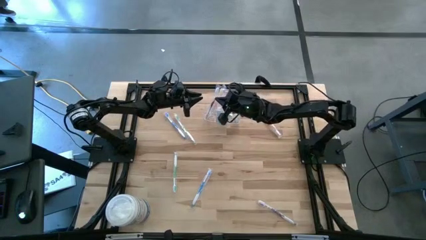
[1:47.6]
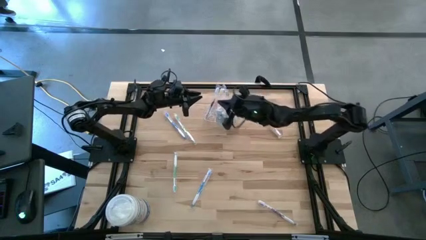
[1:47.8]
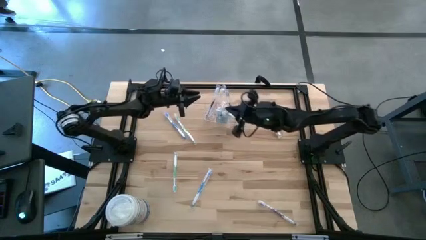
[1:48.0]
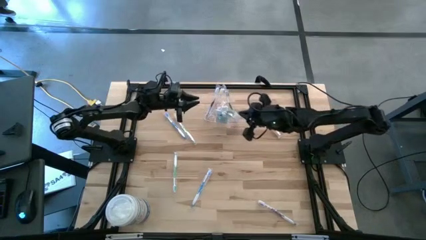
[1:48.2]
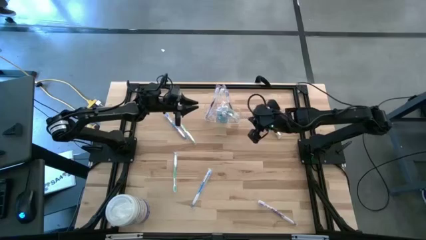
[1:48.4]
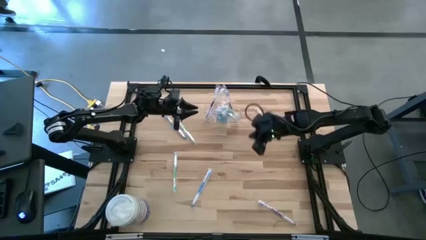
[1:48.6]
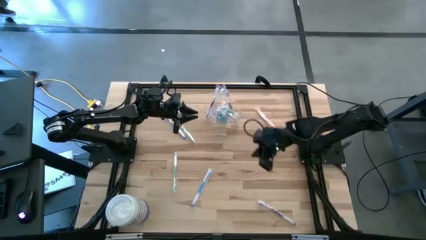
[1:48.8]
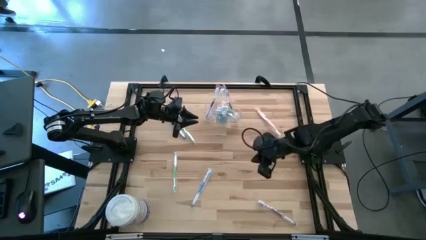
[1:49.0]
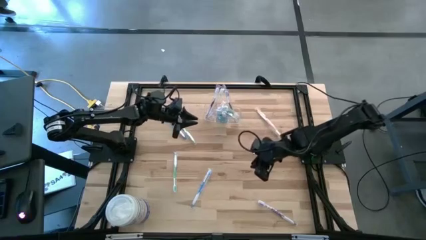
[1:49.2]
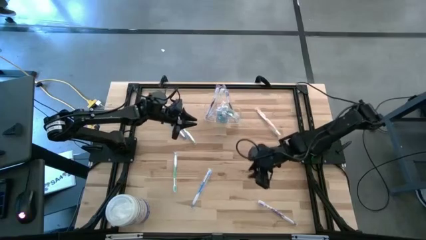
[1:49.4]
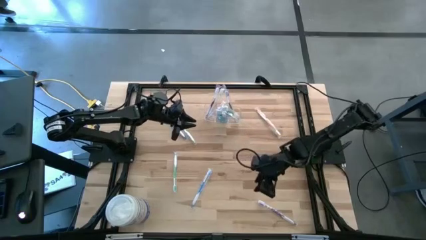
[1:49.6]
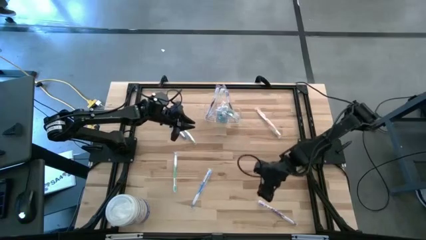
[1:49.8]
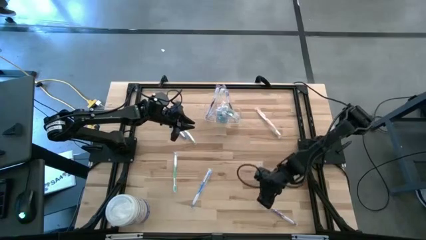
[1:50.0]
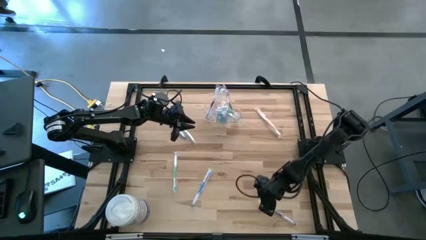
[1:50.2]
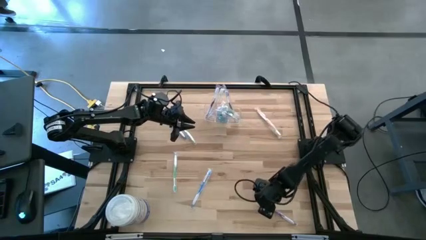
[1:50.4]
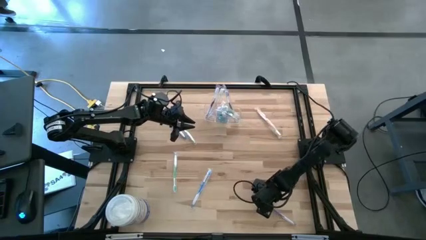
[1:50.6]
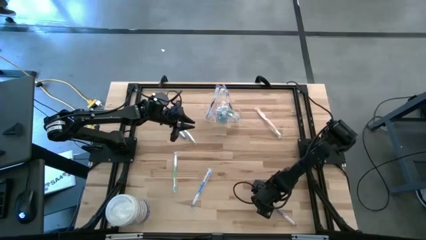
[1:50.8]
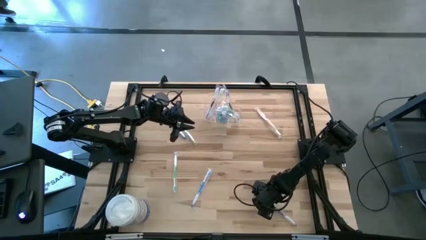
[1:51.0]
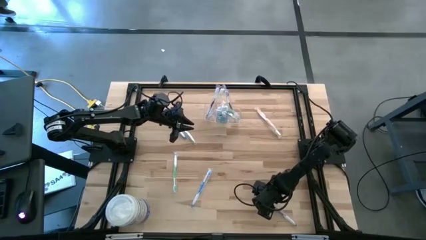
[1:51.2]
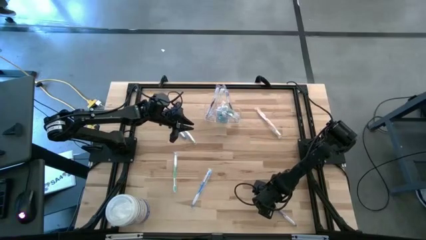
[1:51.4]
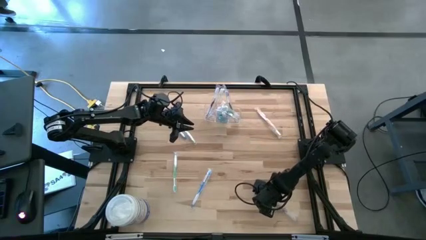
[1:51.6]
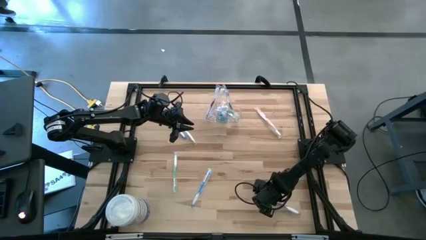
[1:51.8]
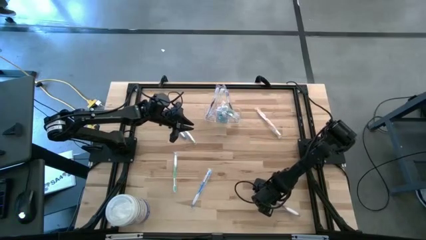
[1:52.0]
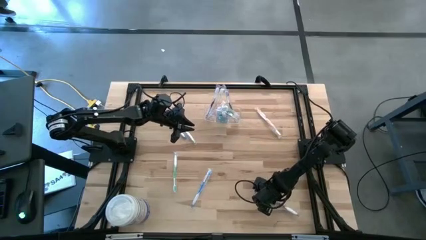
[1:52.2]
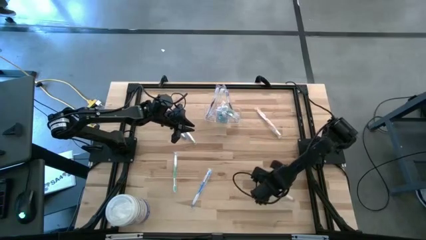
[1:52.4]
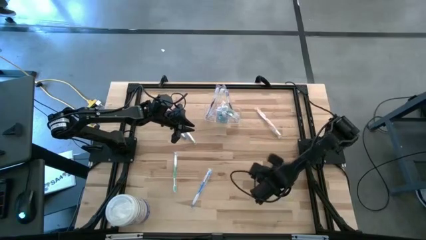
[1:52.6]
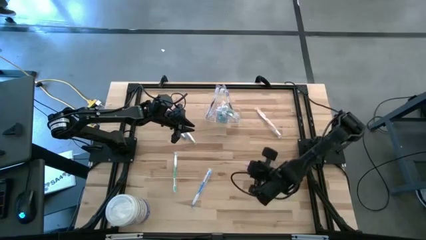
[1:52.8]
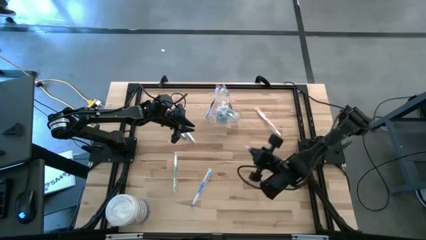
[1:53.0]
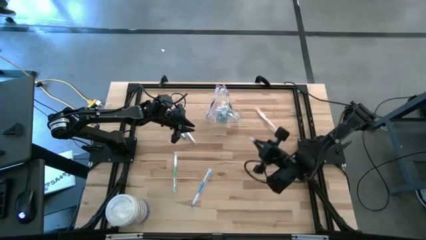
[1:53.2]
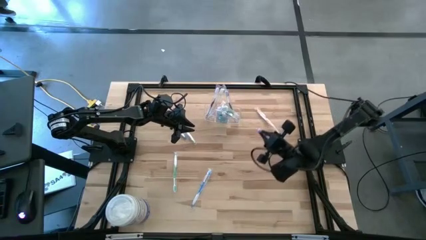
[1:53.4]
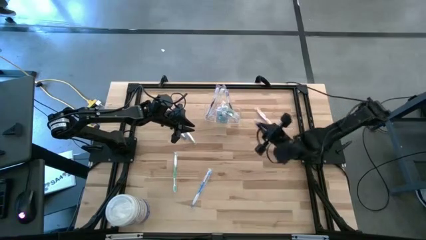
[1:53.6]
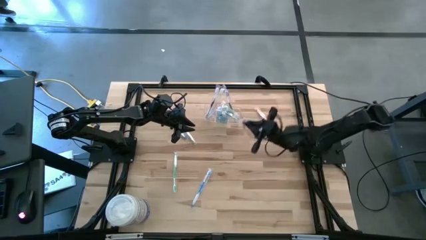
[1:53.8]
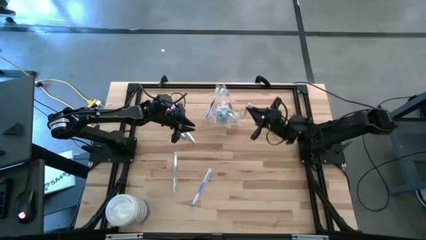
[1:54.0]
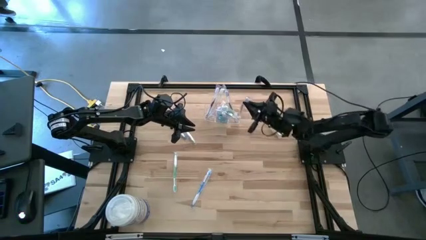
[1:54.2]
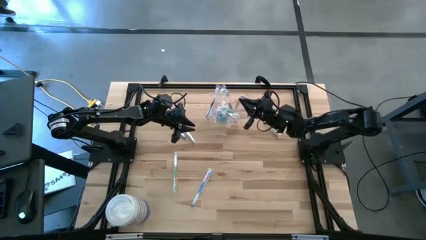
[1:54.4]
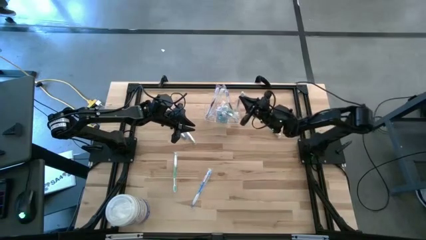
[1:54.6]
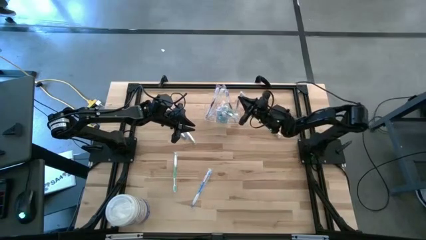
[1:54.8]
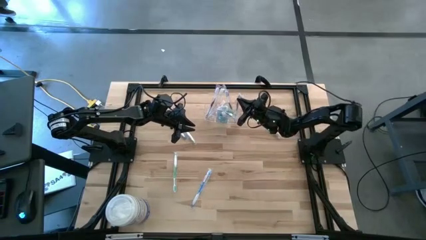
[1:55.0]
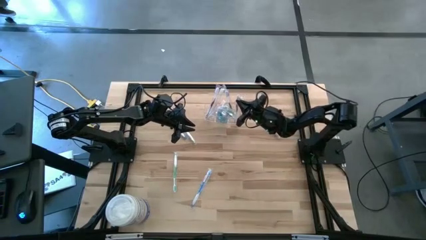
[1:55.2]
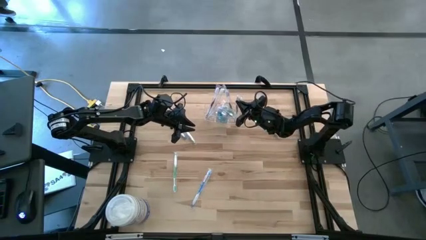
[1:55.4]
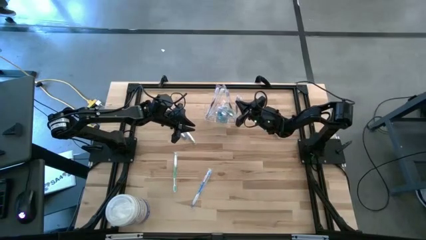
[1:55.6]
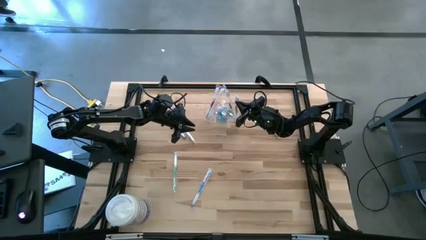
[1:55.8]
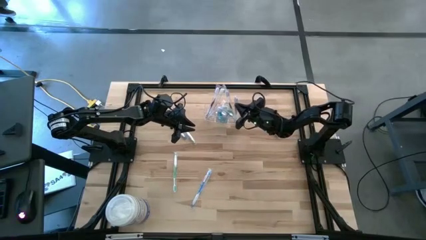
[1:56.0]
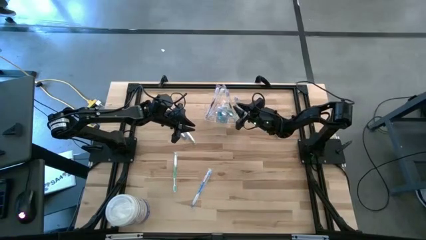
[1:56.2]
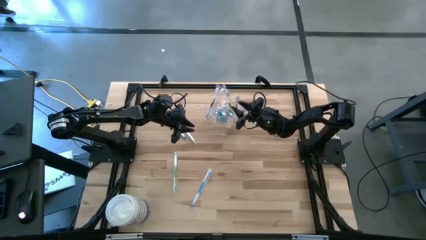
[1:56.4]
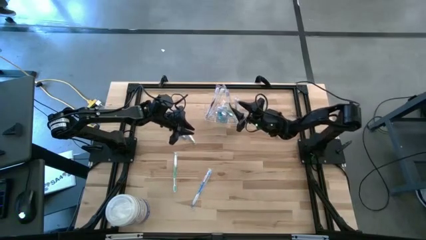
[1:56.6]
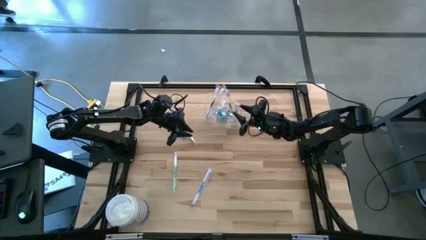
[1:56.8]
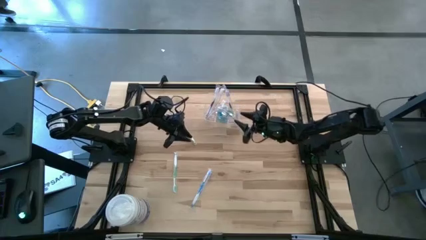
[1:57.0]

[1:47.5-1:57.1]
Task: Pick & Place toothbrushing station
Put the violet toothbrush into the transparent organizer

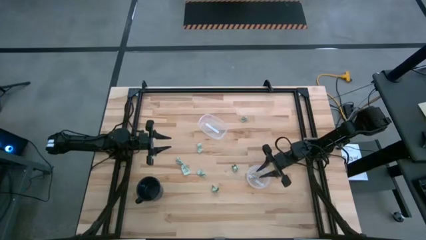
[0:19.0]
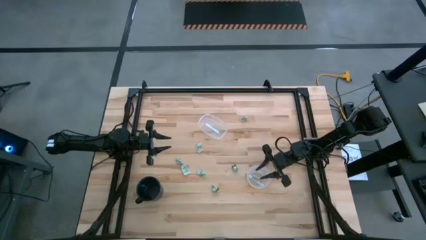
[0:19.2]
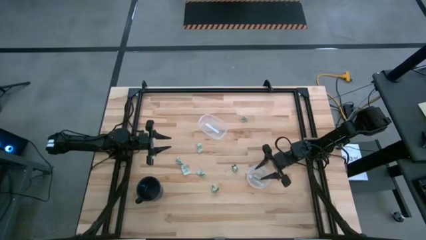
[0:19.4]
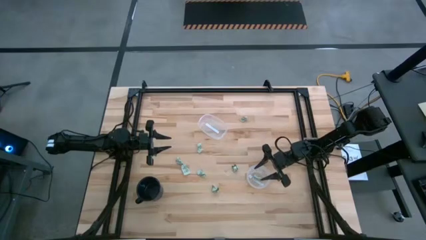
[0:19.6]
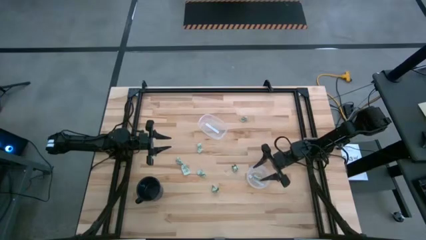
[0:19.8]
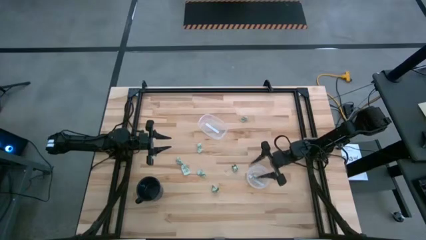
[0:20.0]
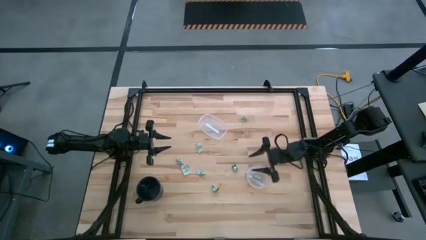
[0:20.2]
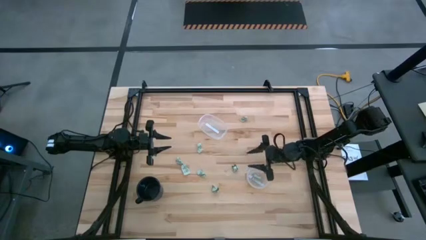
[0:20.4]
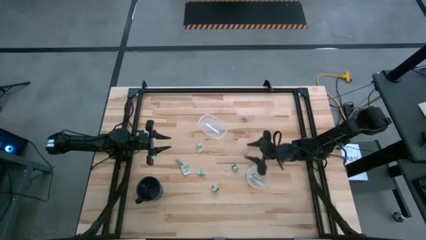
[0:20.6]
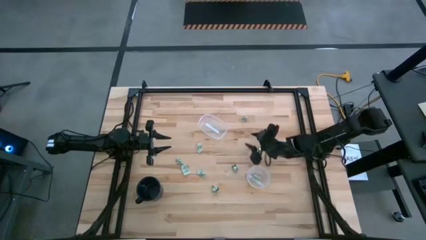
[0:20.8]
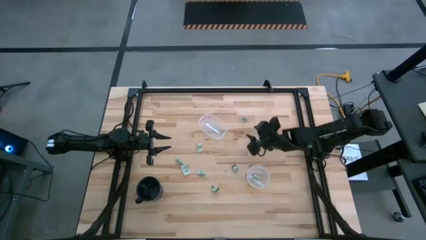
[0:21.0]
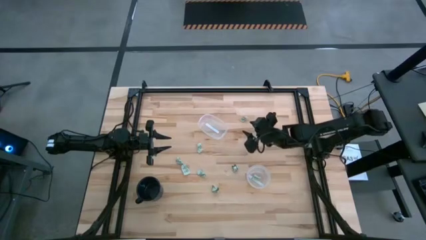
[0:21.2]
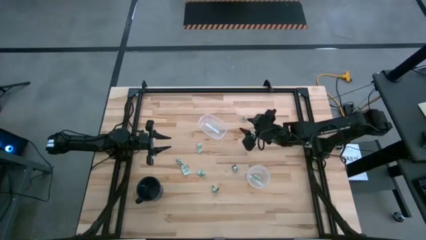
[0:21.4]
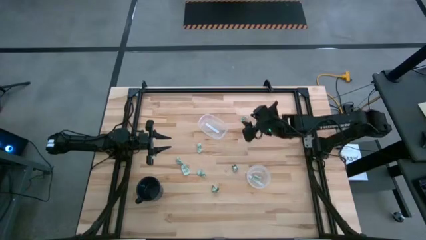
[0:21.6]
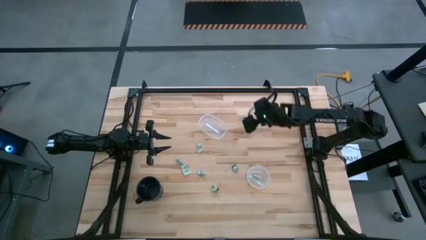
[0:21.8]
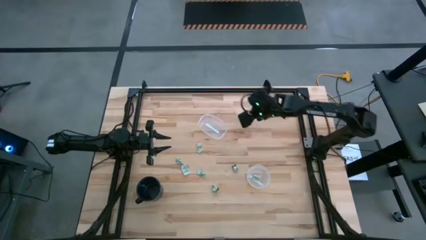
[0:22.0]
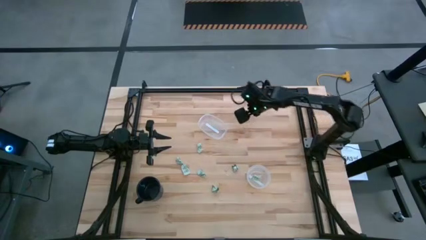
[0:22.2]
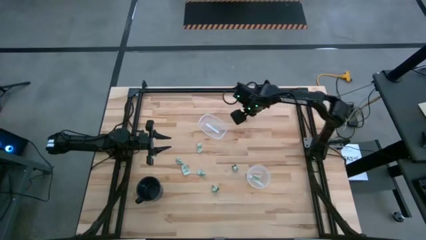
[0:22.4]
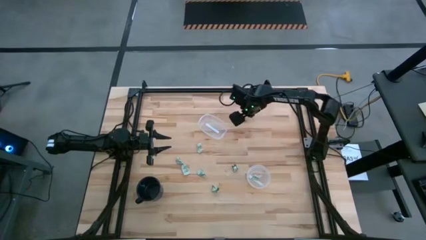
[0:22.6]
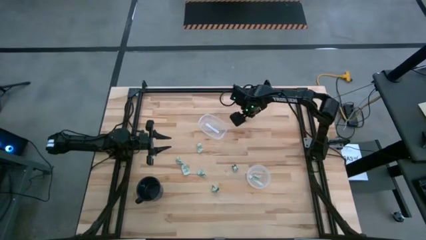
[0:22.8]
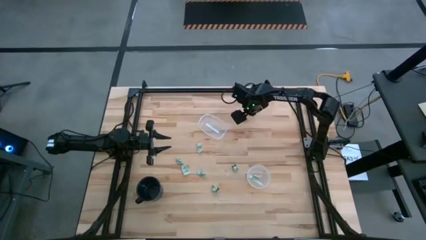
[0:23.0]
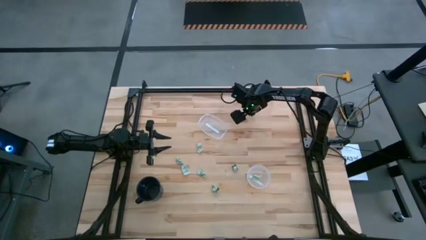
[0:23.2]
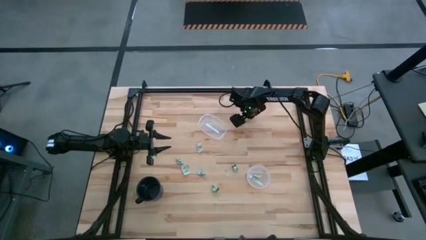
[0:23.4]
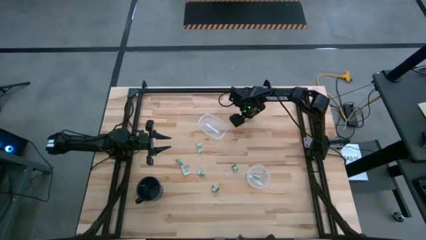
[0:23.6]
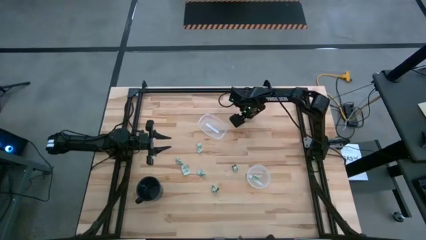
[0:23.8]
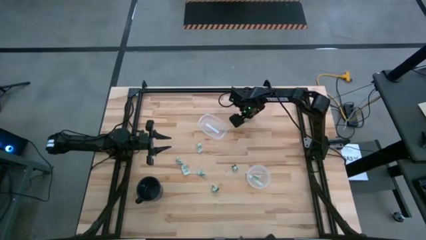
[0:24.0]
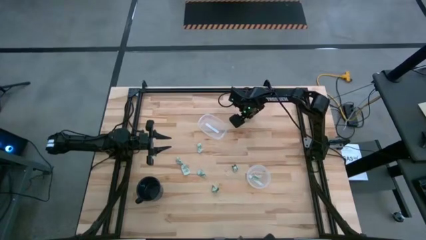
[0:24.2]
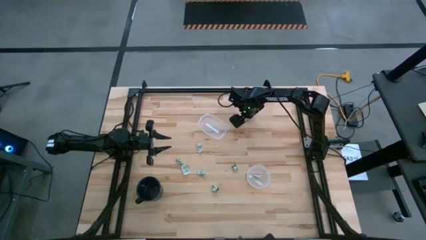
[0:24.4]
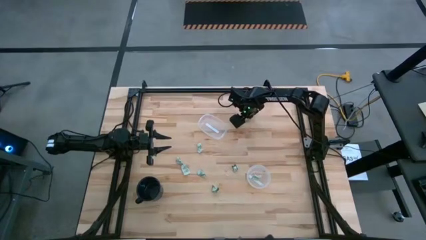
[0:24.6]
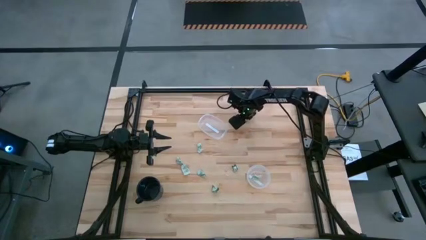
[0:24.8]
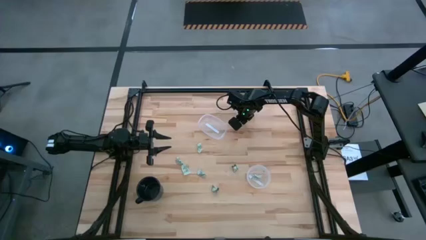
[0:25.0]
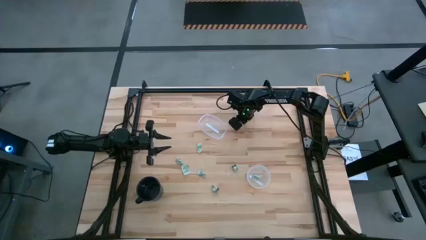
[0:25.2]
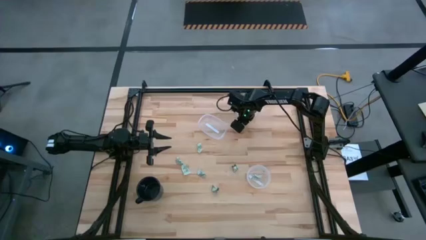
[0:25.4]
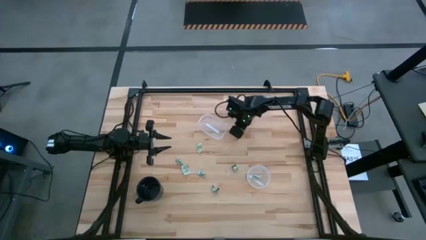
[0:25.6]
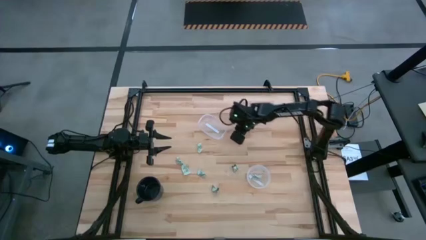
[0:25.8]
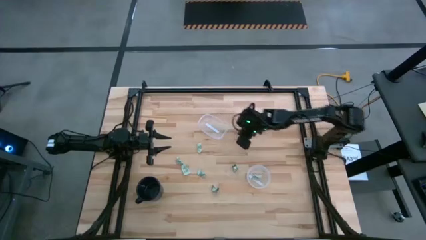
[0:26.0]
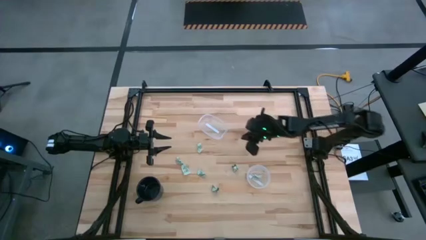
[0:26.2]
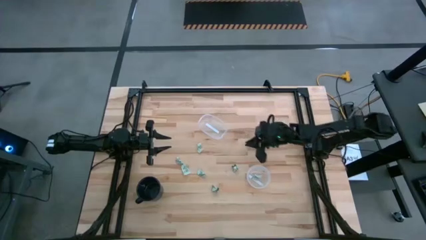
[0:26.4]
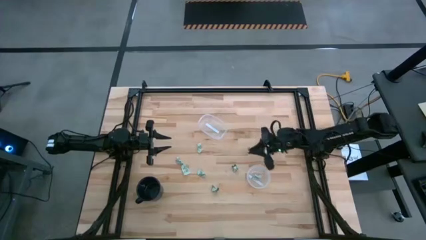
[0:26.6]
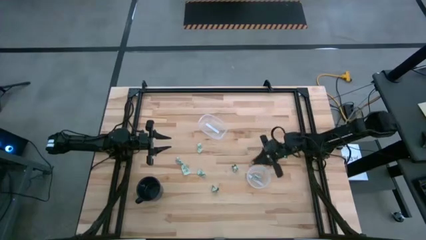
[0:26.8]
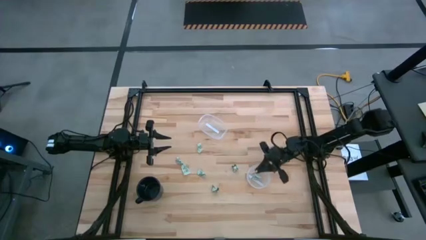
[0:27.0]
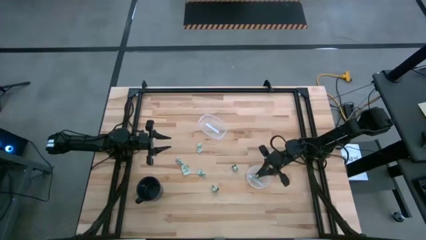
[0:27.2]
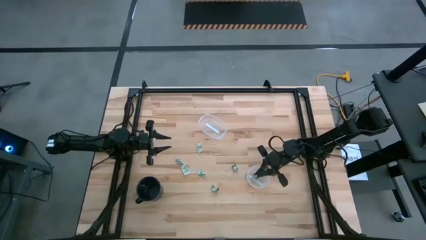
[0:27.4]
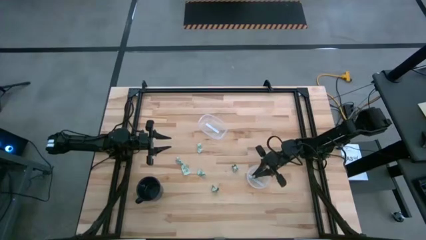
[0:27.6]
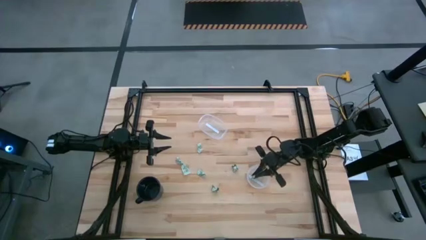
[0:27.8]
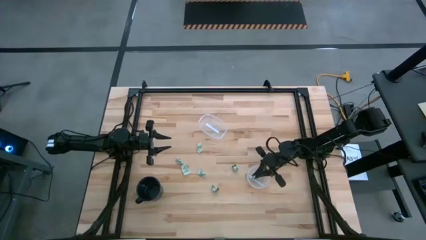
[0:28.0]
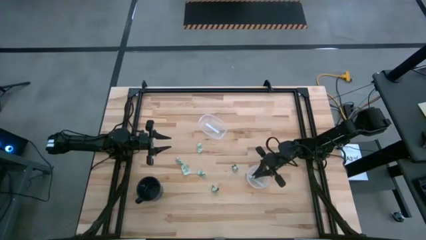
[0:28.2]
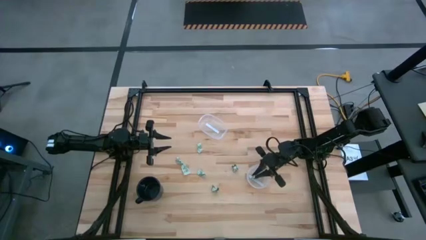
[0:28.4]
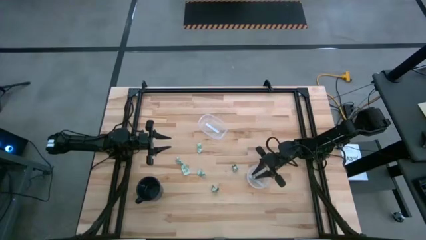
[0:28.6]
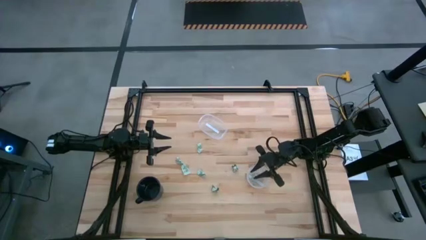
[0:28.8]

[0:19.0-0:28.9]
Task: Pick and place Stevia / Truvia into bins
Put the stevia packet into the round transparent container
